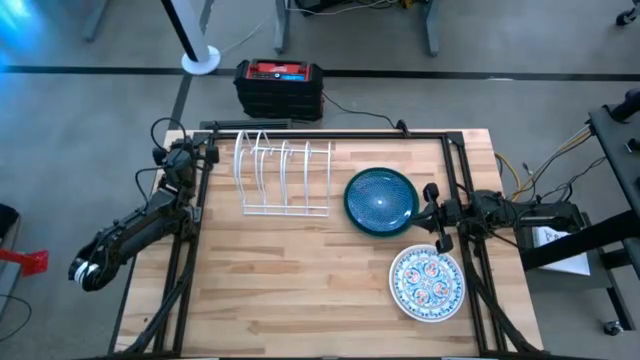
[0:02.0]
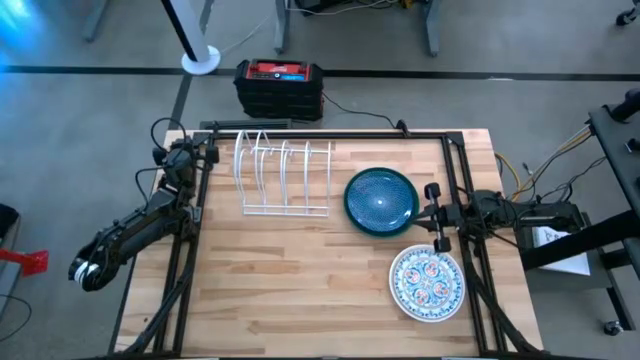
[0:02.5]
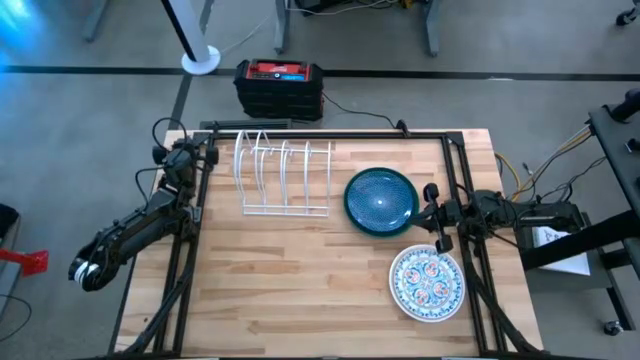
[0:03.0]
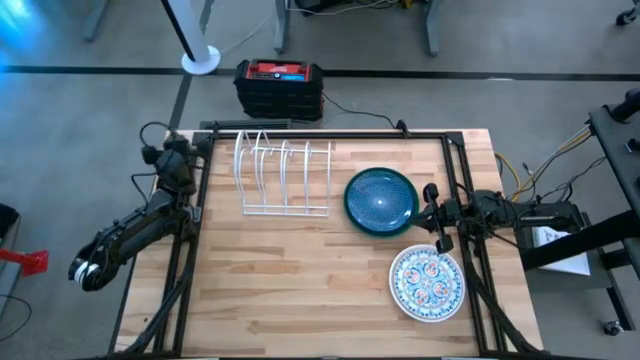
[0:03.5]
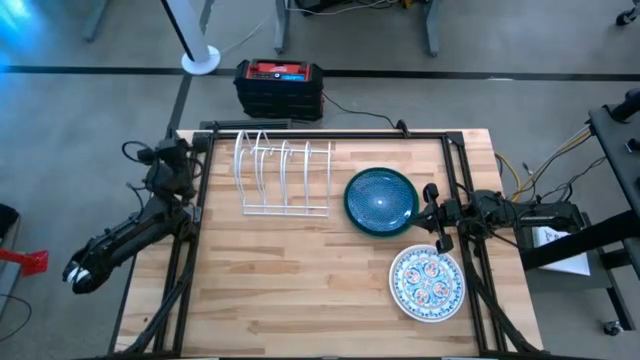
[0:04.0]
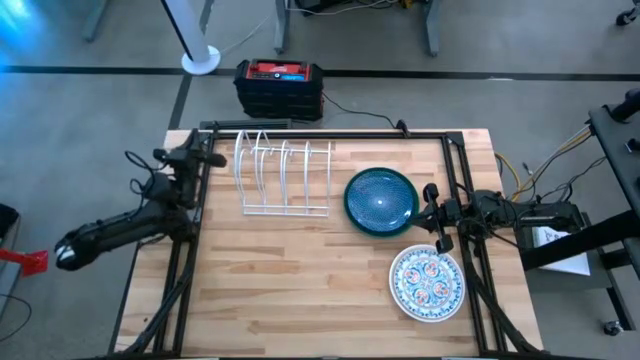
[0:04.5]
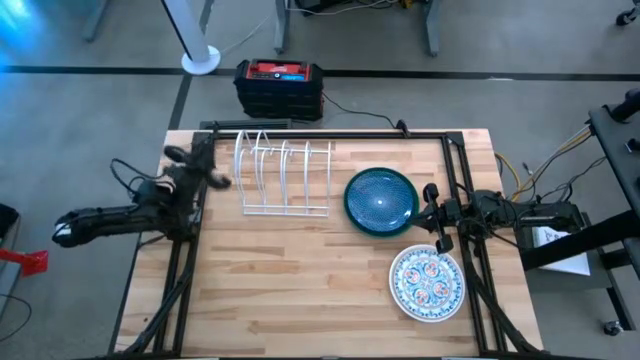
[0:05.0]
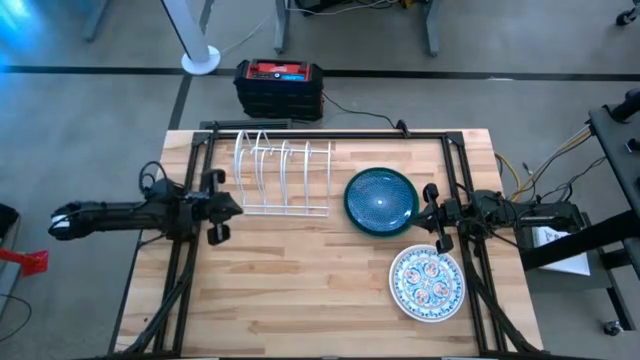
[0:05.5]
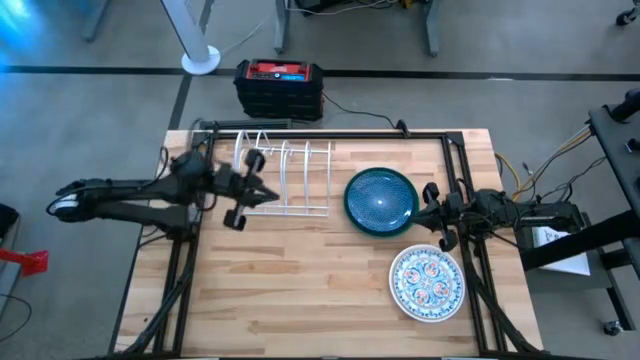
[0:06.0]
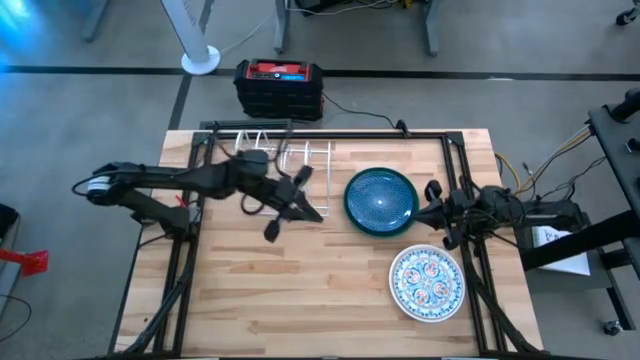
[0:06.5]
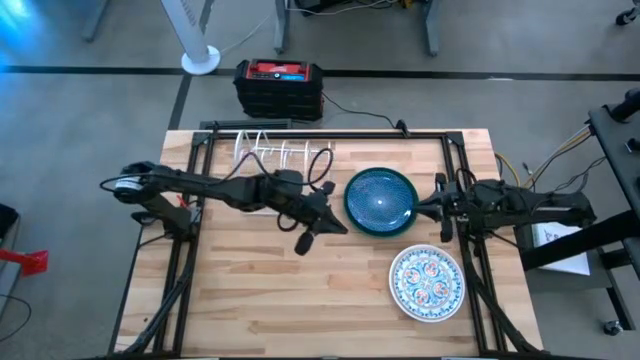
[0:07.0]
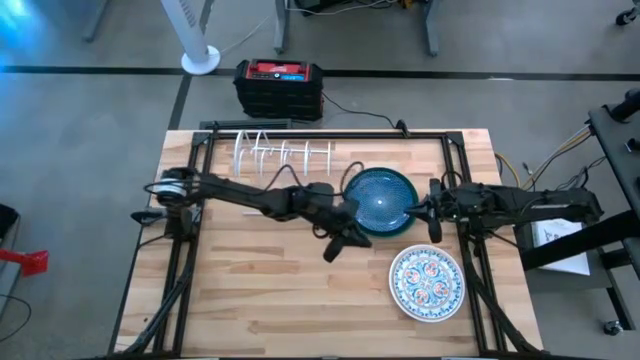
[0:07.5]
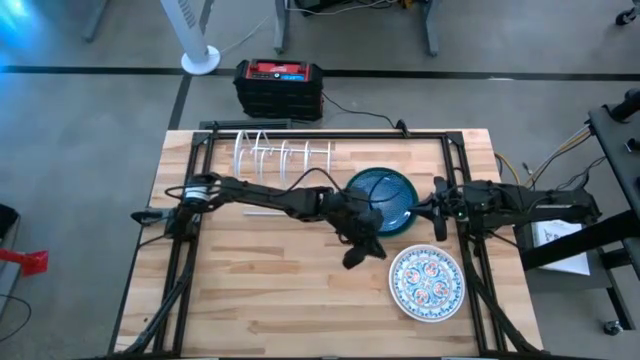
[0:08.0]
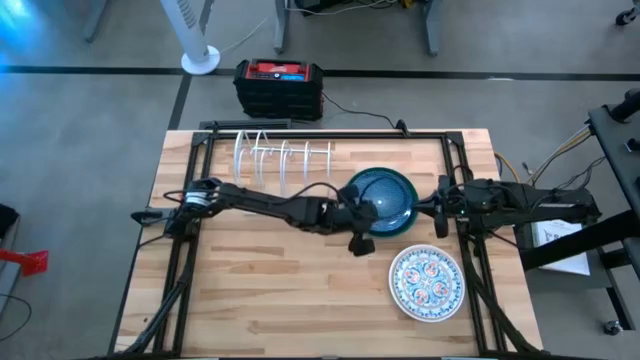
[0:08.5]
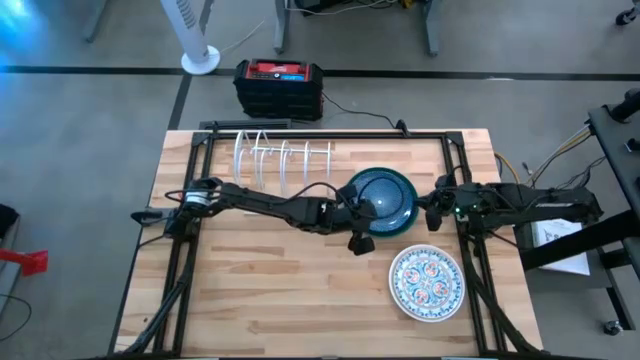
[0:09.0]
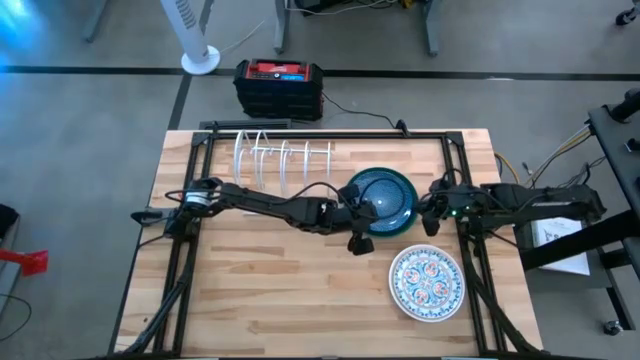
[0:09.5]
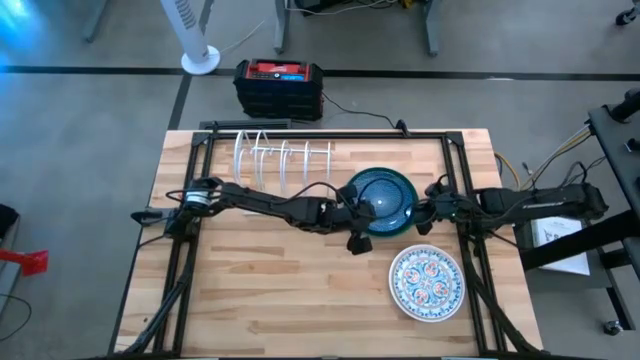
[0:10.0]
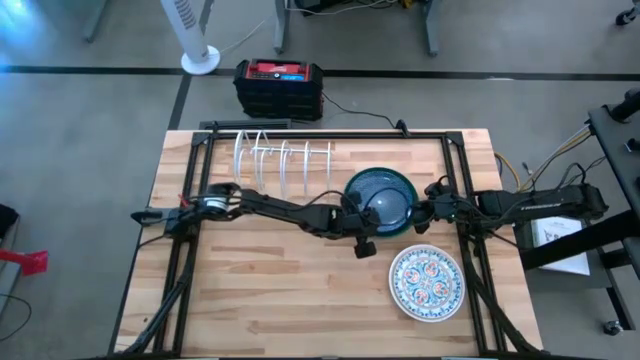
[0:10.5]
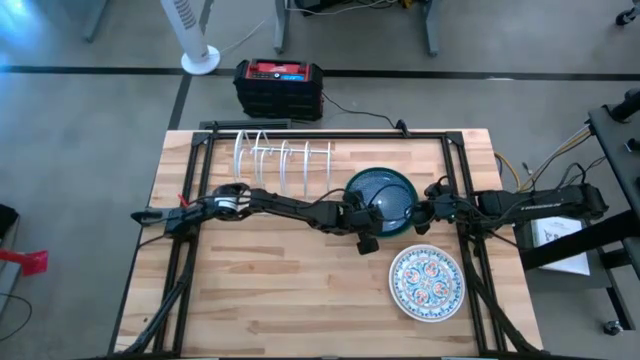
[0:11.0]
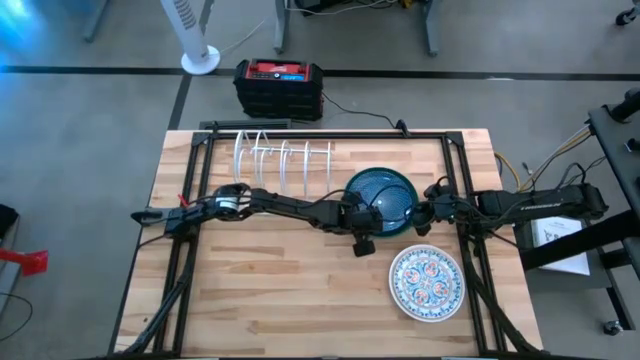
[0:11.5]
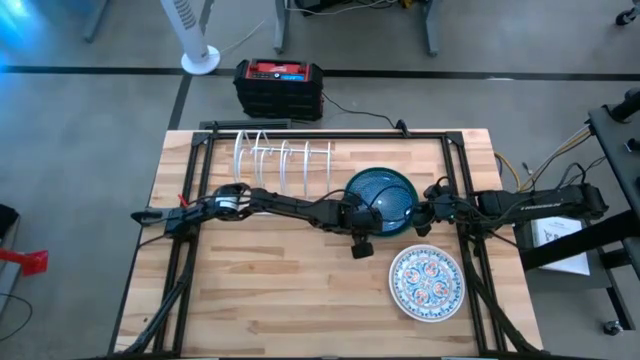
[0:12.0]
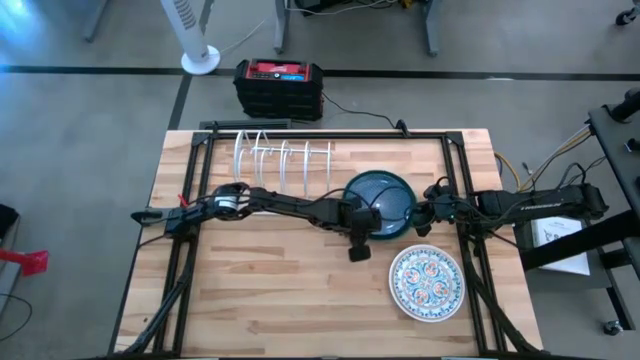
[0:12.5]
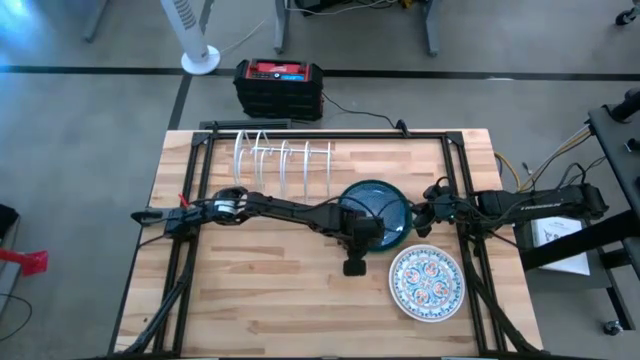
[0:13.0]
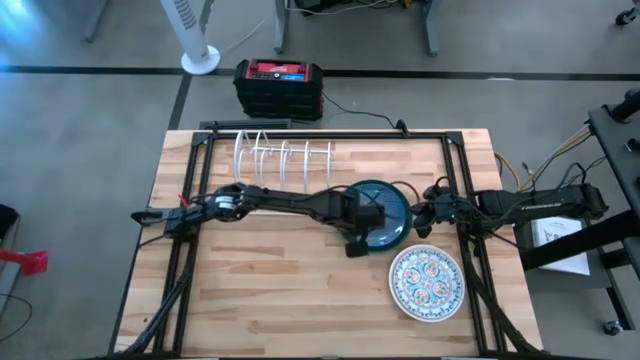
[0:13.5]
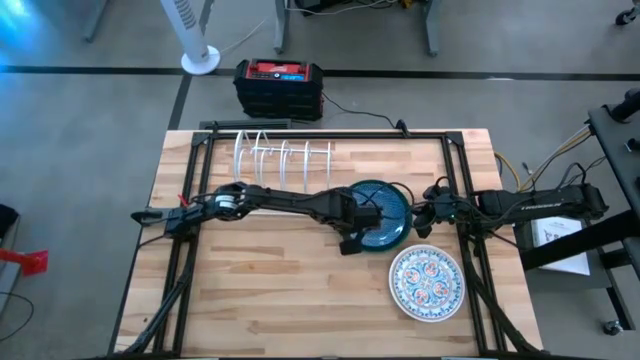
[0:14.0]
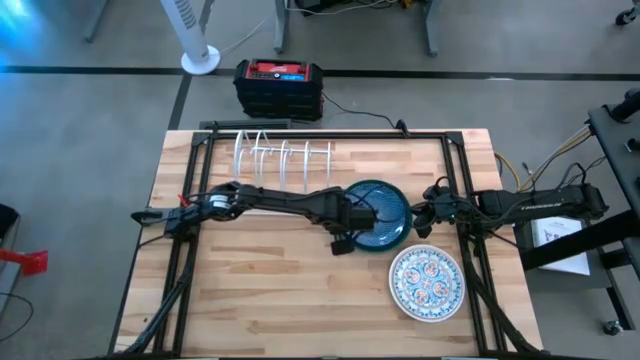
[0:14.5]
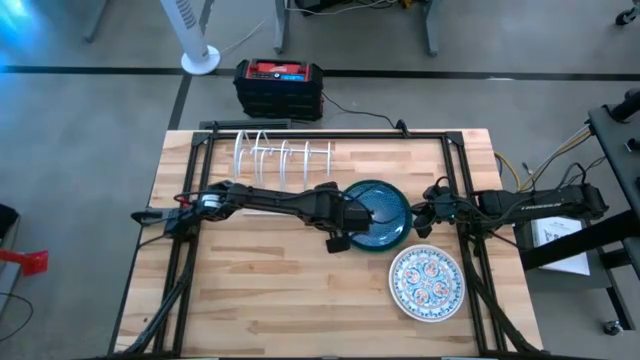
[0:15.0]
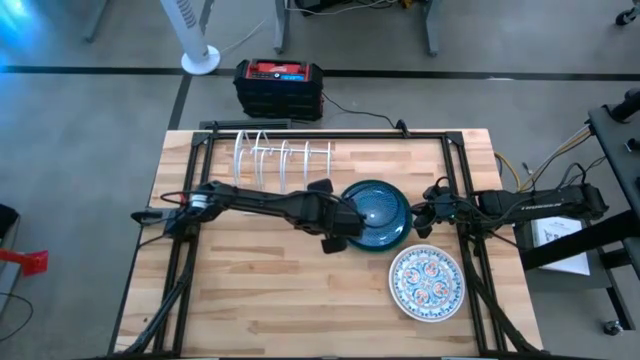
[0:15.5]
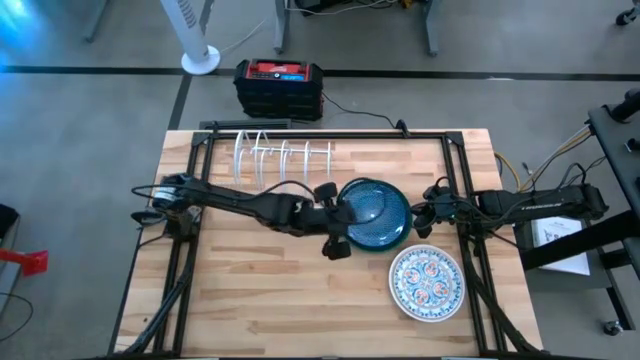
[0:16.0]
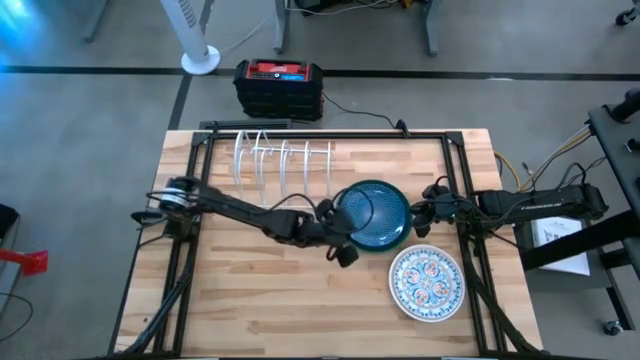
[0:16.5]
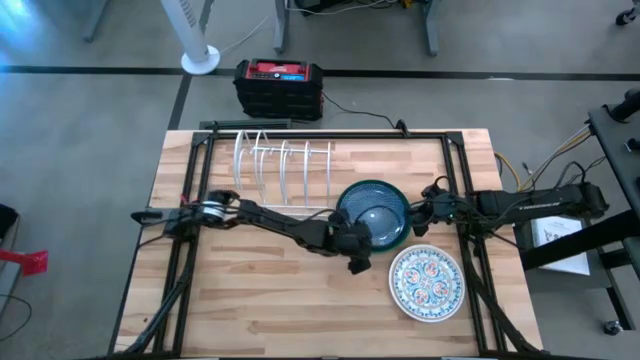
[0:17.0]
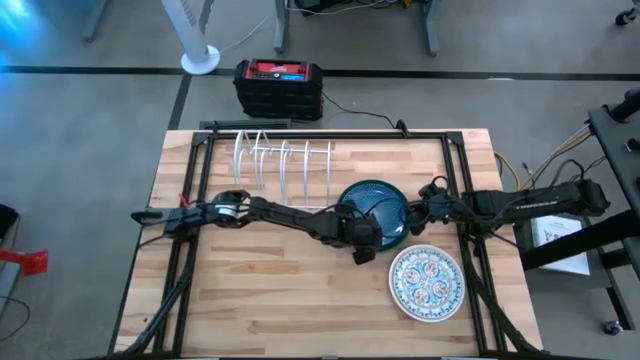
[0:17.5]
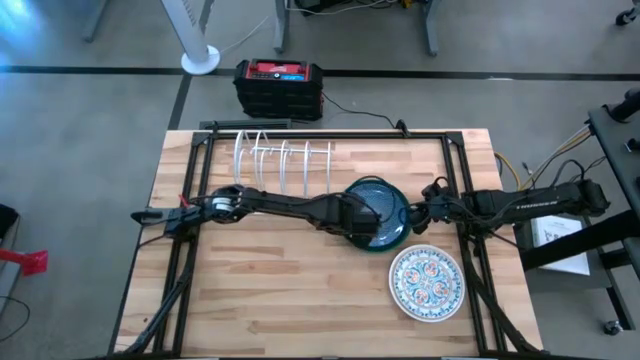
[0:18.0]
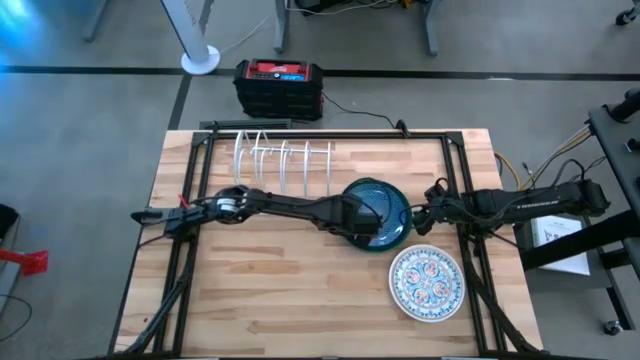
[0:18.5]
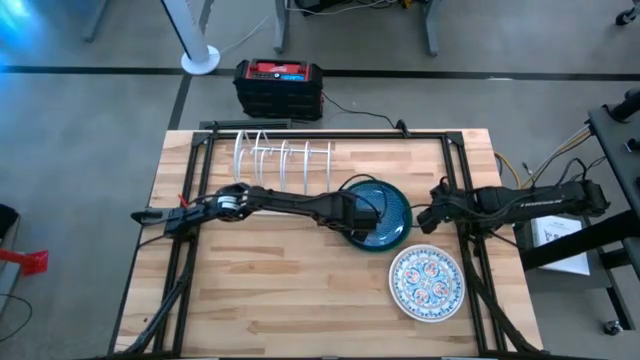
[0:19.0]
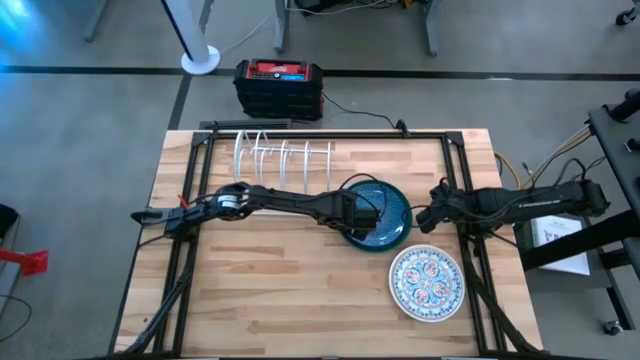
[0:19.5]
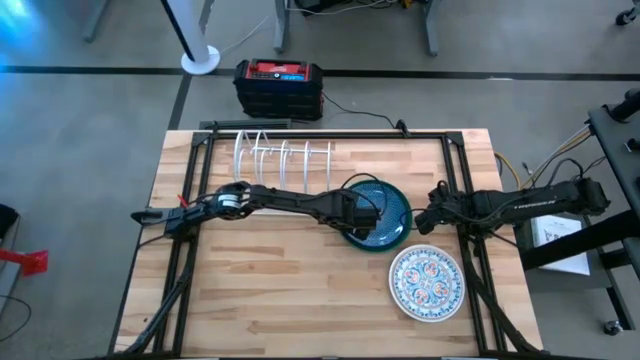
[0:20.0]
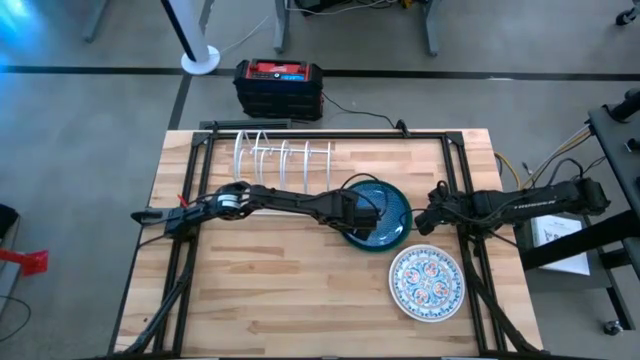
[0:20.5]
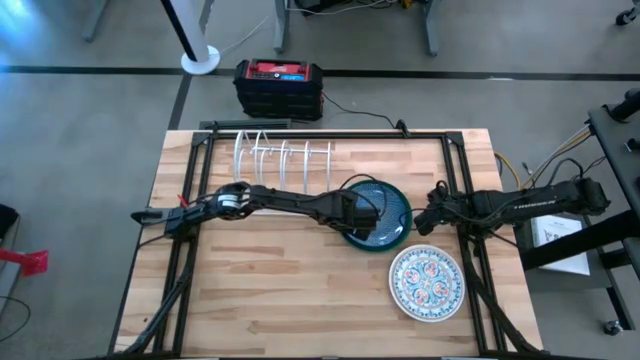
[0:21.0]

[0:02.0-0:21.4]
Task: Sort dishes
Put the blue patterned plate in the dish rack
